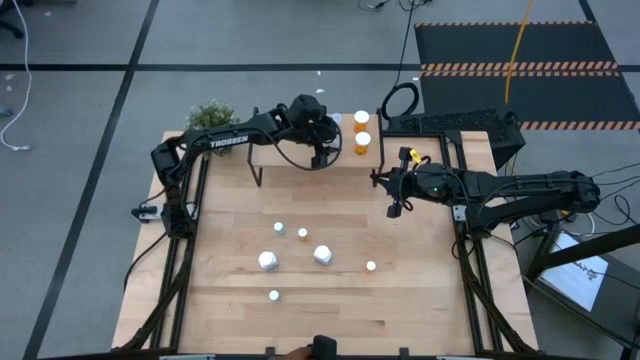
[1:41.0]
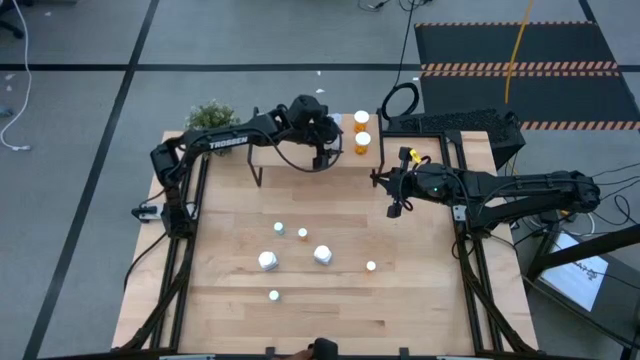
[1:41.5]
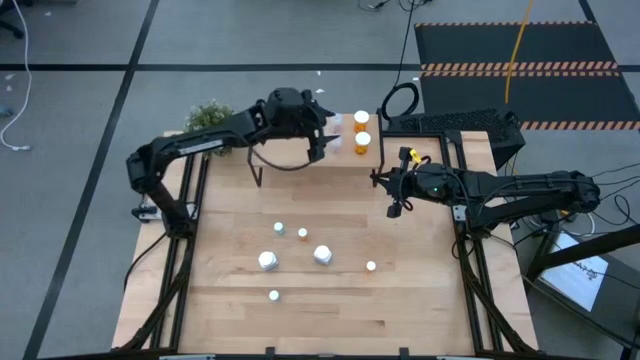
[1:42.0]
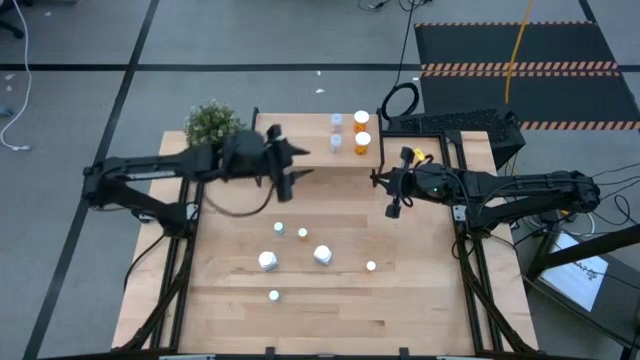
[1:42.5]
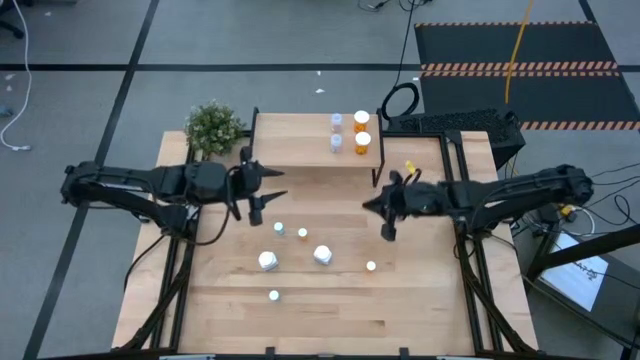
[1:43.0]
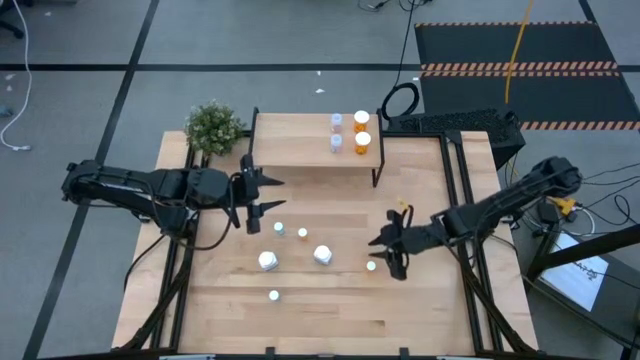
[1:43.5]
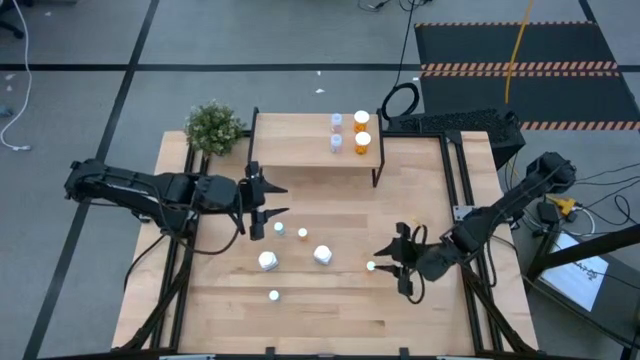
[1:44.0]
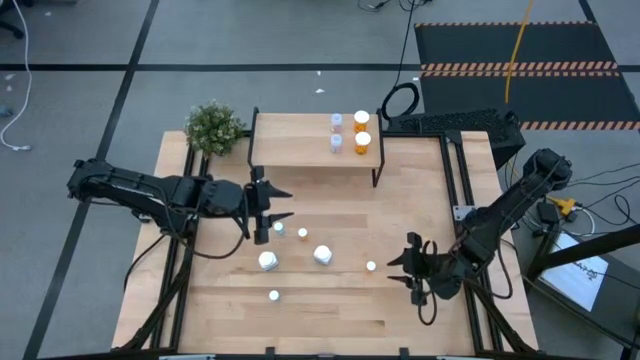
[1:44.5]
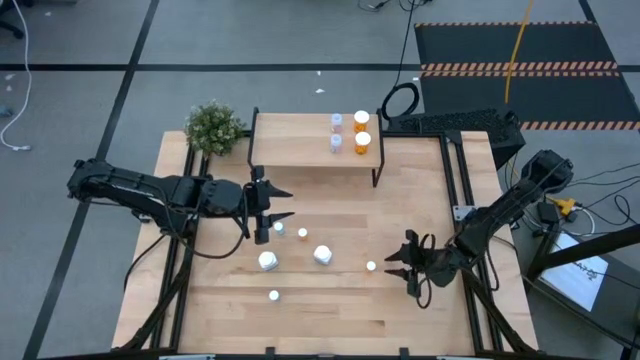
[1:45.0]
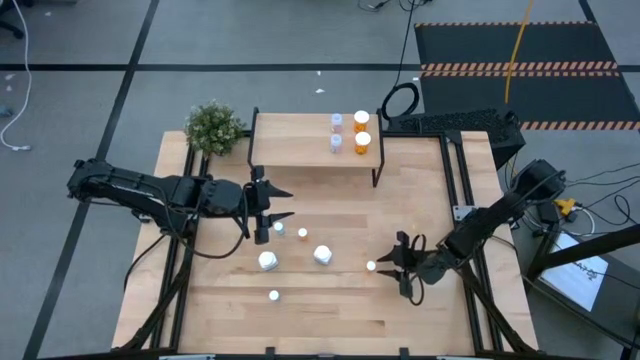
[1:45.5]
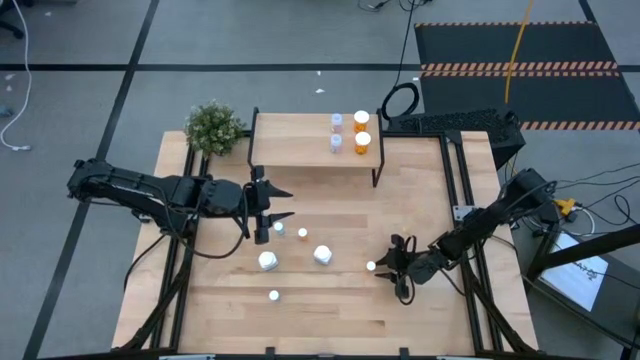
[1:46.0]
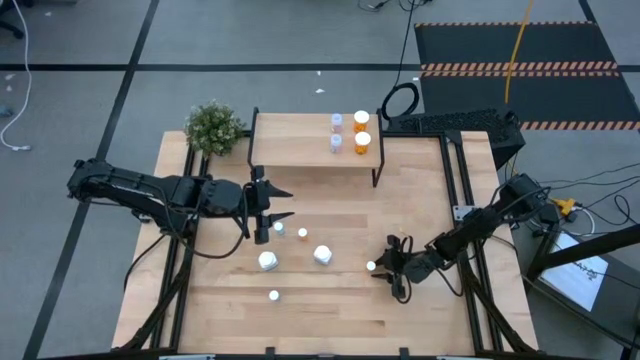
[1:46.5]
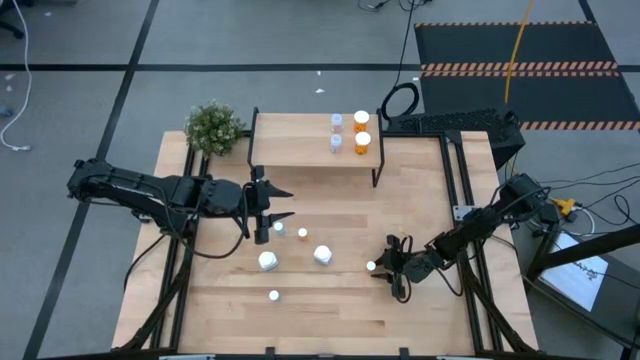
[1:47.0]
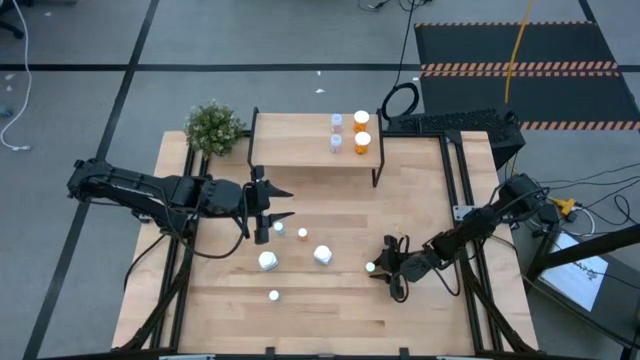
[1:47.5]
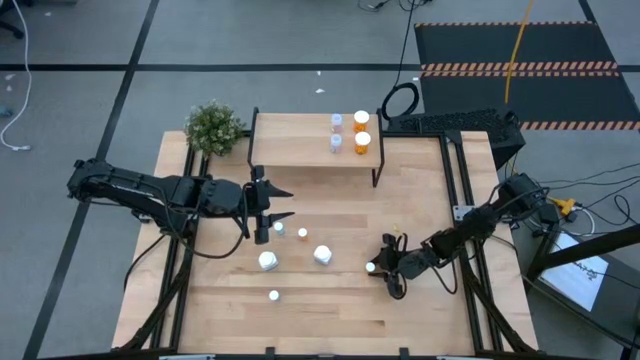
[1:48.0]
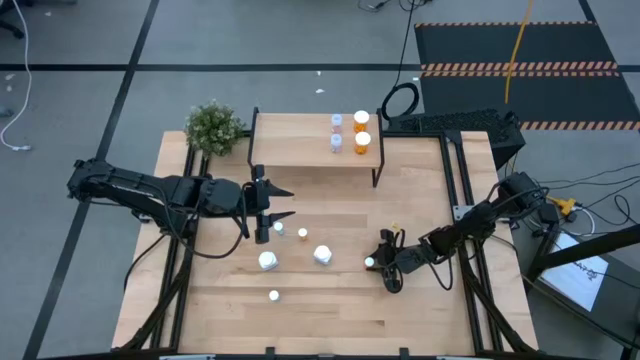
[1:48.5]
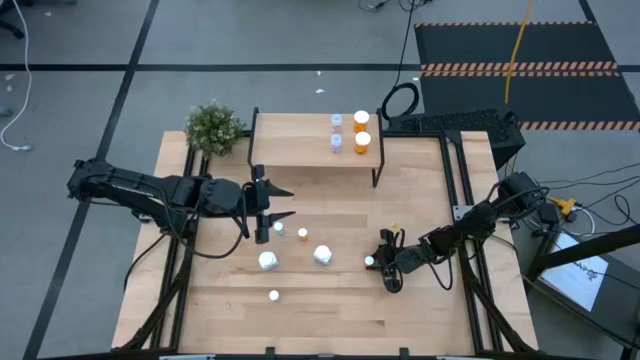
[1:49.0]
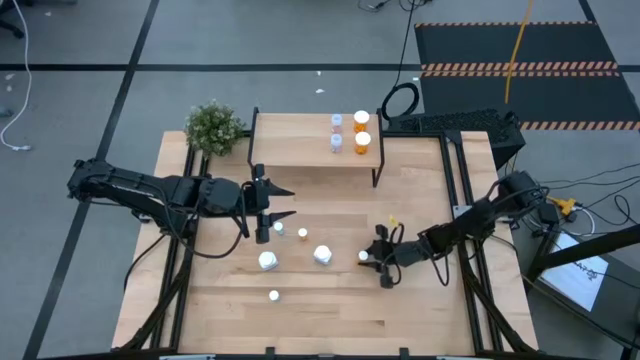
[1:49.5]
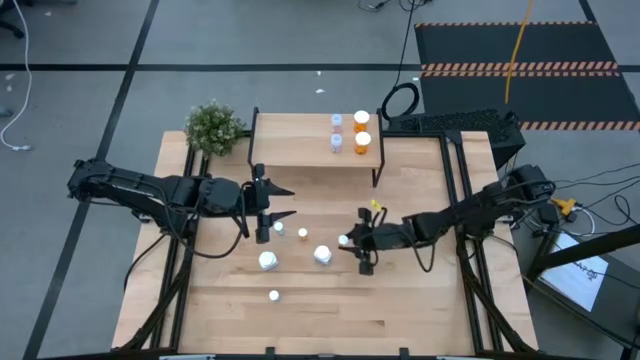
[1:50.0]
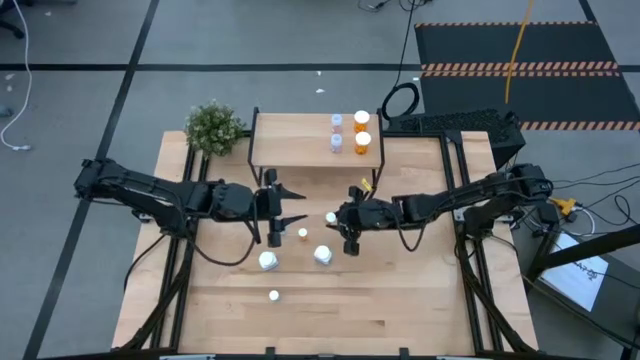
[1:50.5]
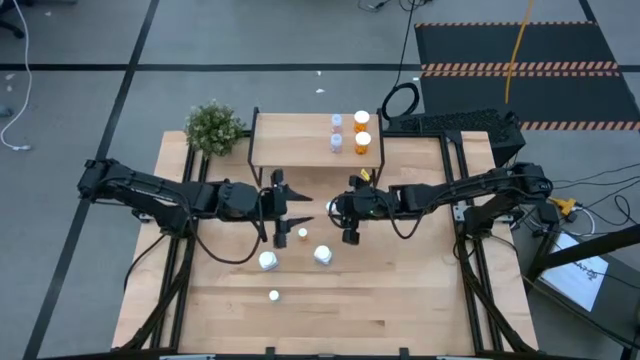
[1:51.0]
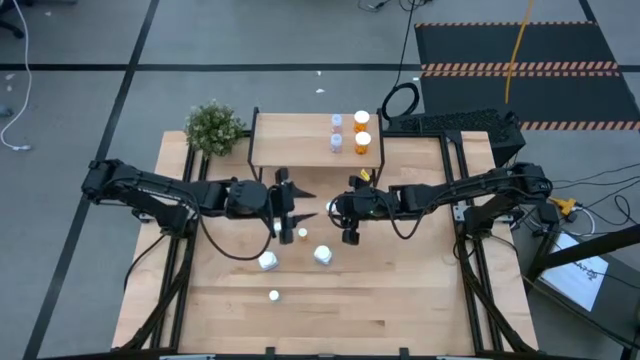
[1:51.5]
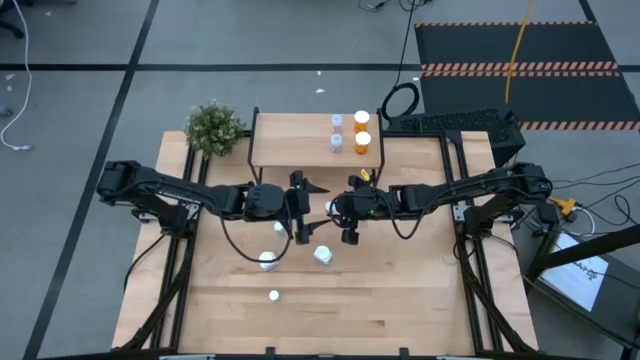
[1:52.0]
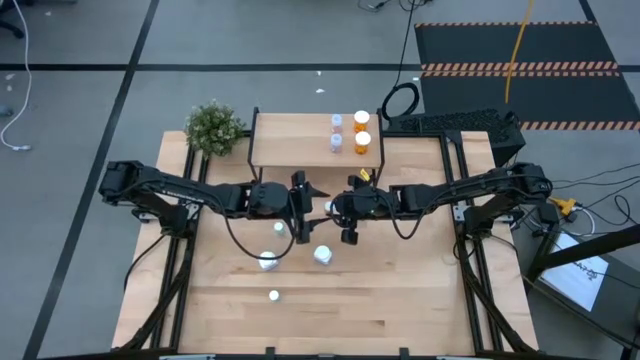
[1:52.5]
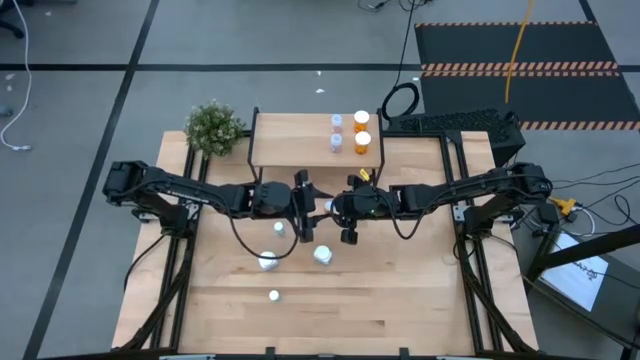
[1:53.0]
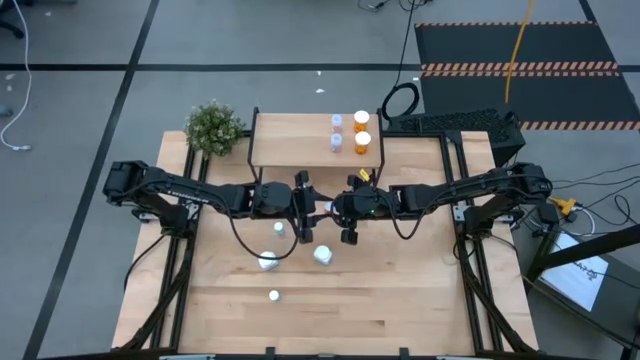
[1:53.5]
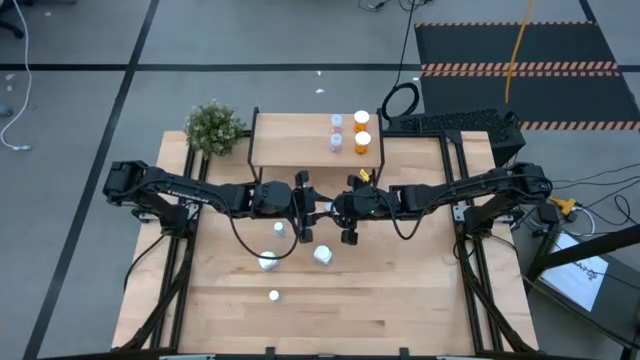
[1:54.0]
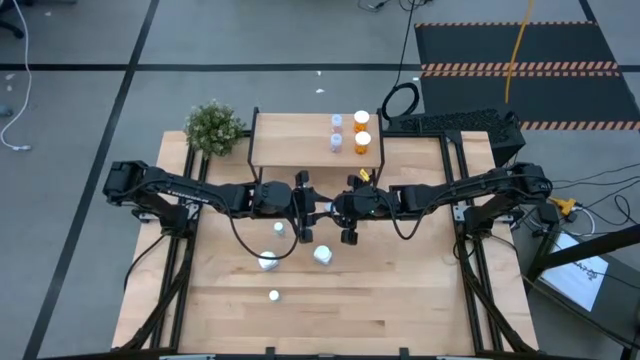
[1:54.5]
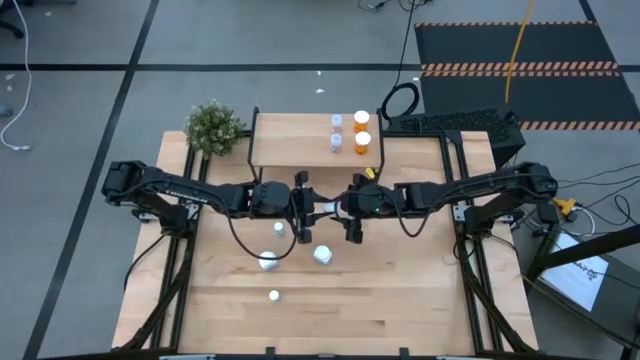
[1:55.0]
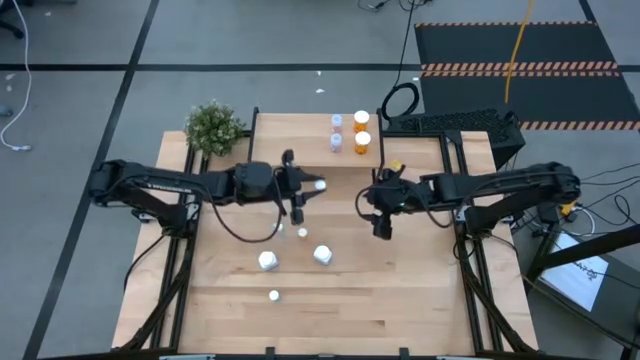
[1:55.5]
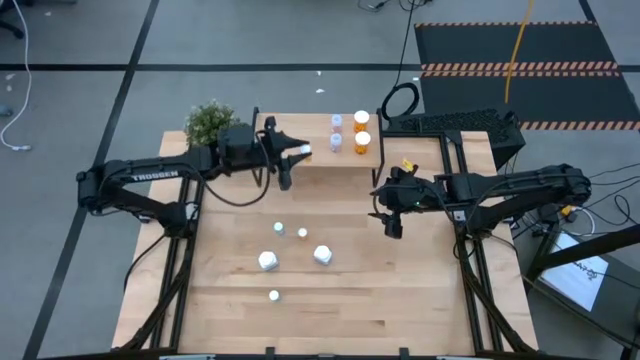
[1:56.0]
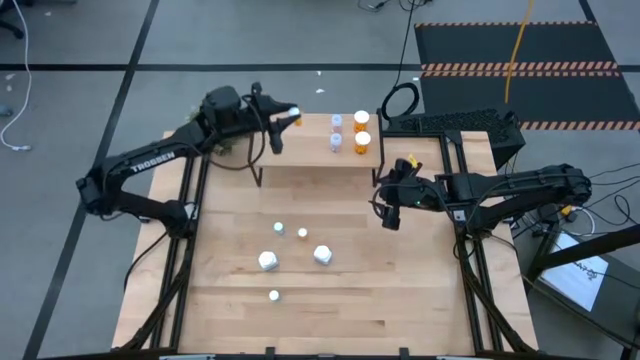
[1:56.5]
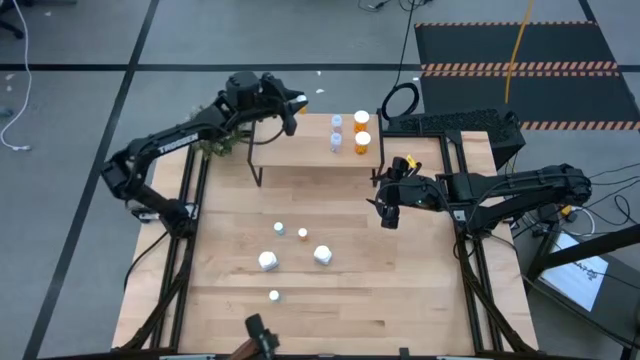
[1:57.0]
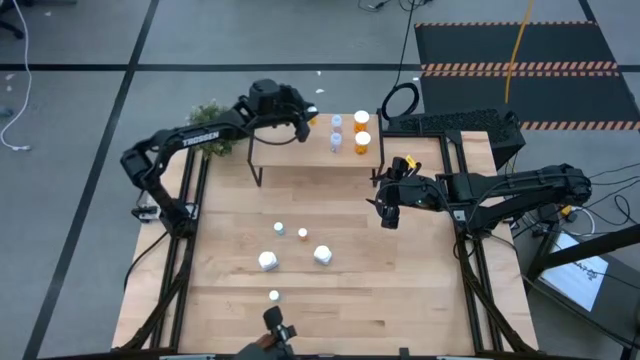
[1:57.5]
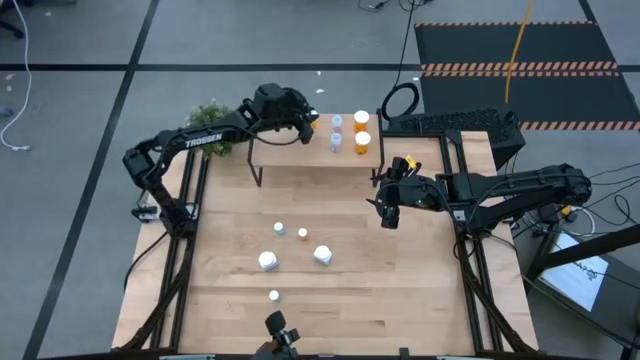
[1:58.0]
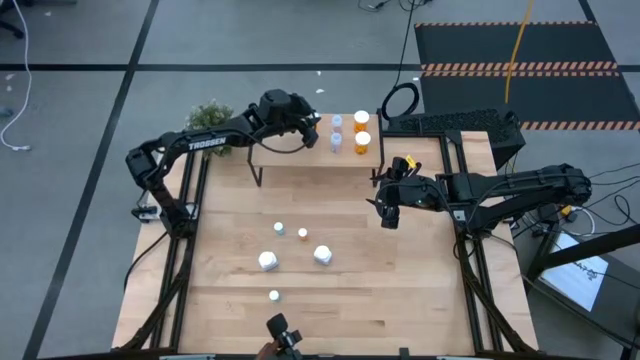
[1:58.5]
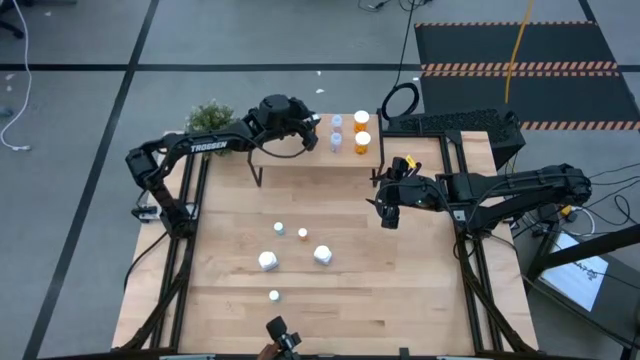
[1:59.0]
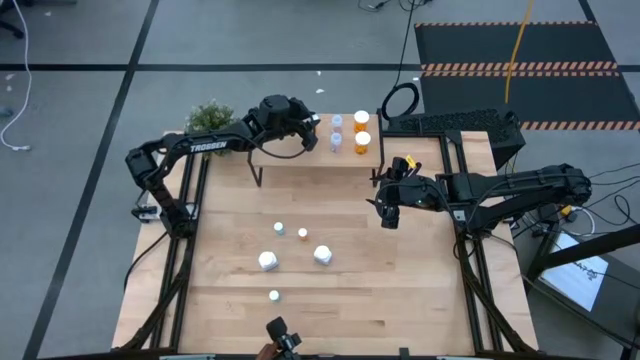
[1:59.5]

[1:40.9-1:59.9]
Task: Pick and place medicine bottles onto shelf by color
Put the bottom small orange pill bottle on the shelf

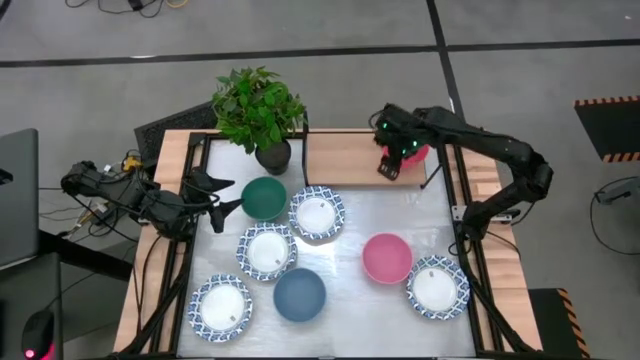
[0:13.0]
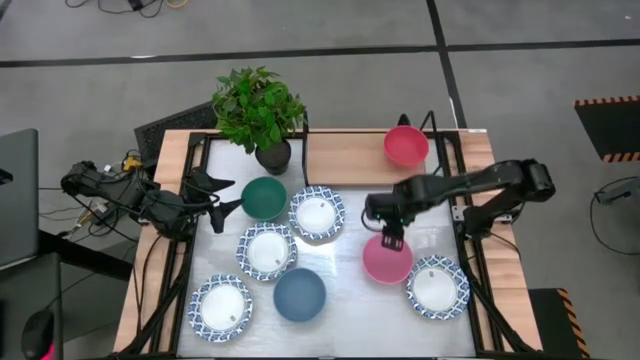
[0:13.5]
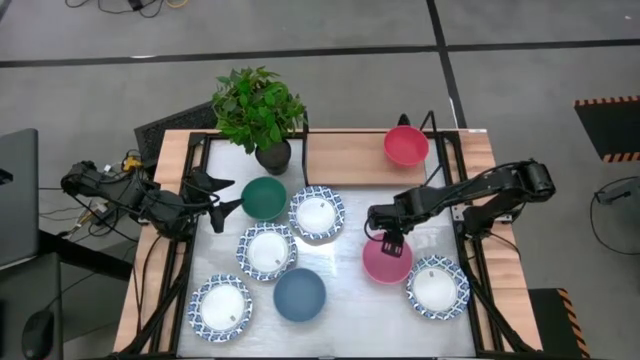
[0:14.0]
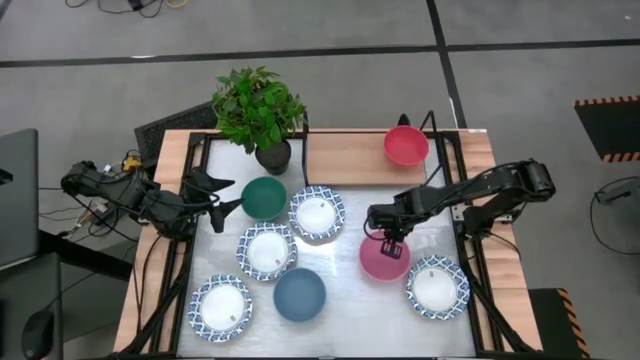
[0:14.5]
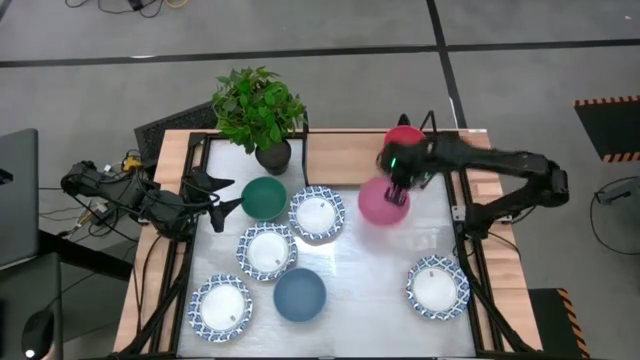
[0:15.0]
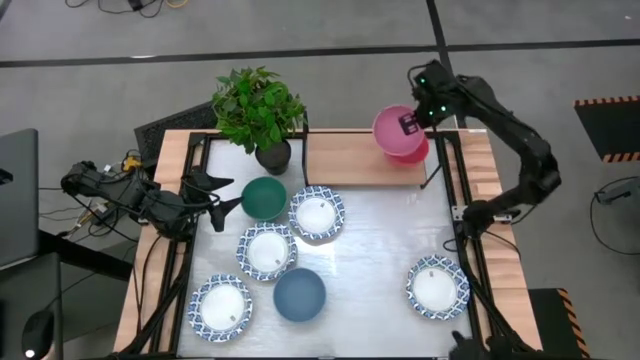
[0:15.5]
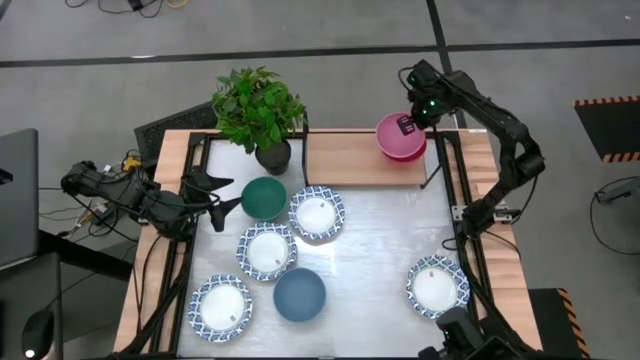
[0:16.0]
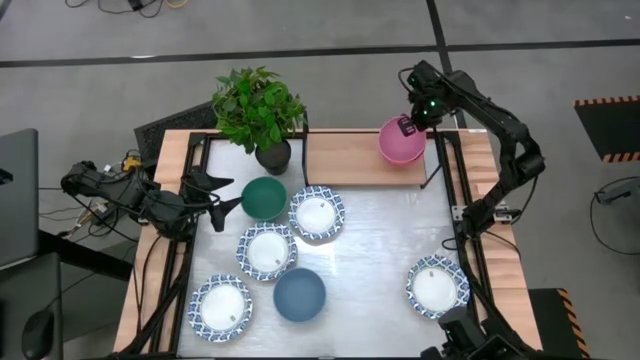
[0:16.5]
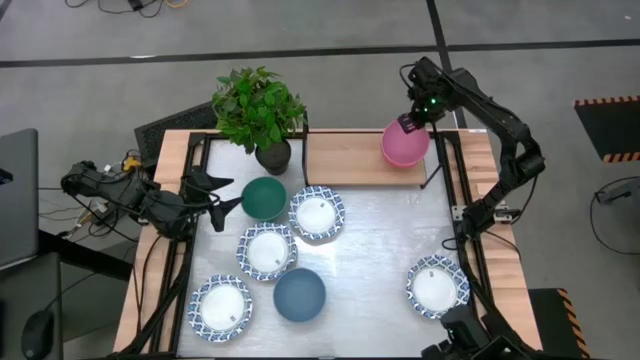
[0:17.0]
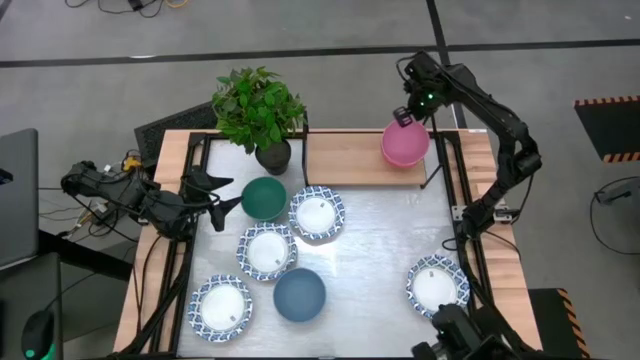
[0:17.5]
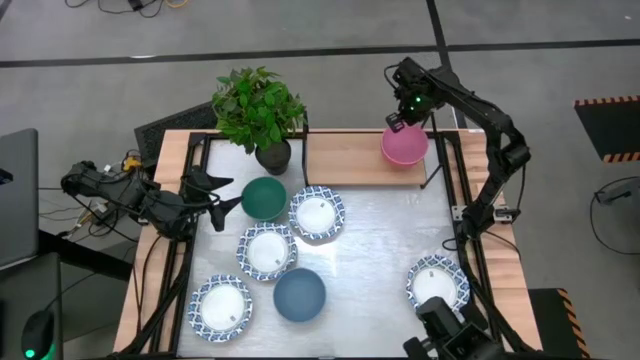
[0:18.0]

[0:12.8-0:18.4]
Task: Place and stack bowls onto a shelf
Stack the pink bowl on top of the orange bowl on the shelf
